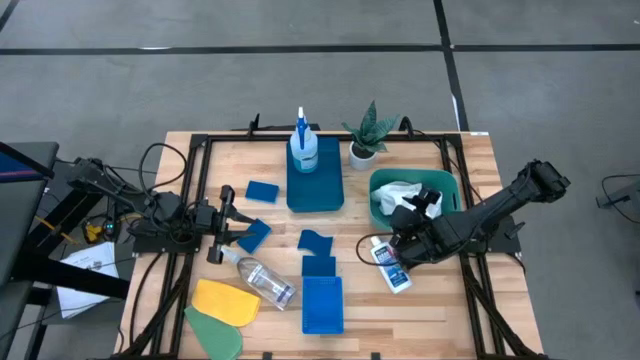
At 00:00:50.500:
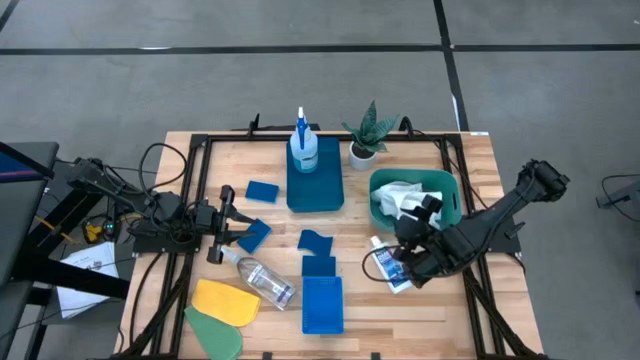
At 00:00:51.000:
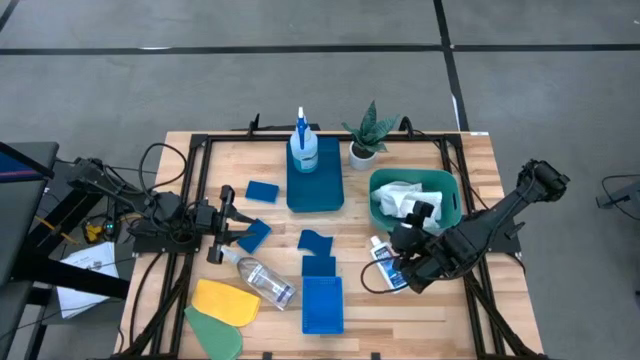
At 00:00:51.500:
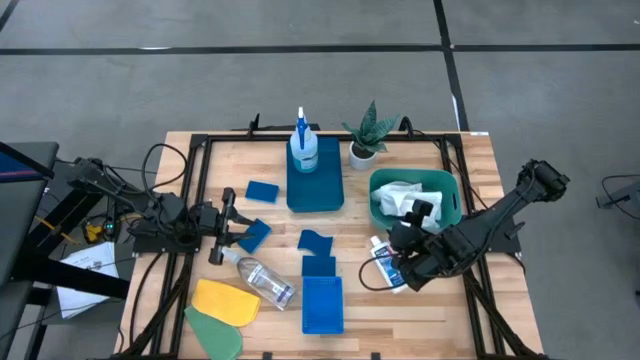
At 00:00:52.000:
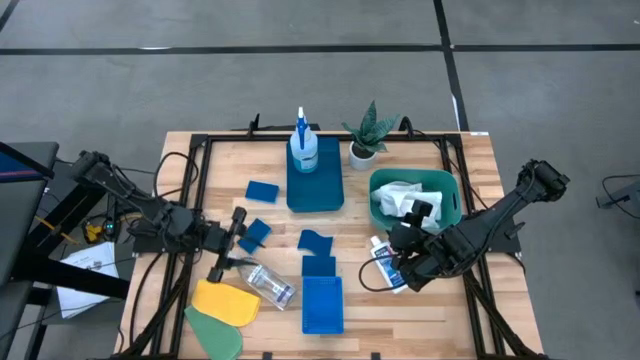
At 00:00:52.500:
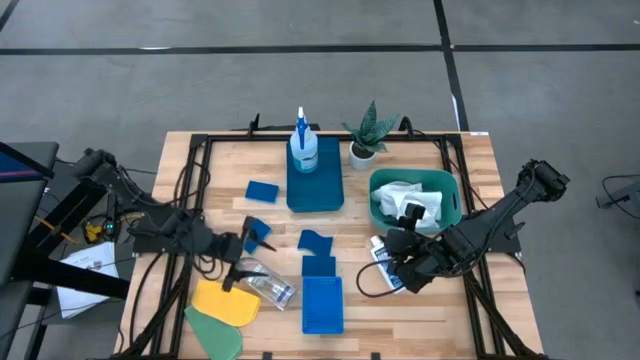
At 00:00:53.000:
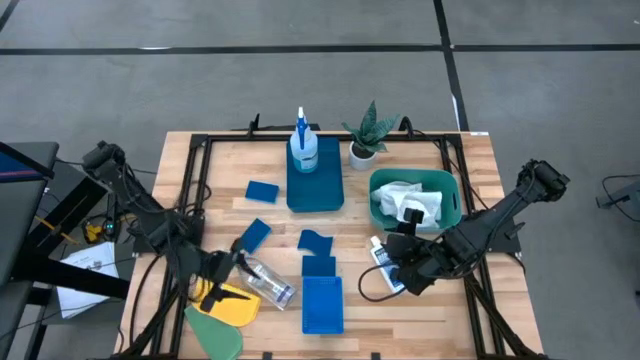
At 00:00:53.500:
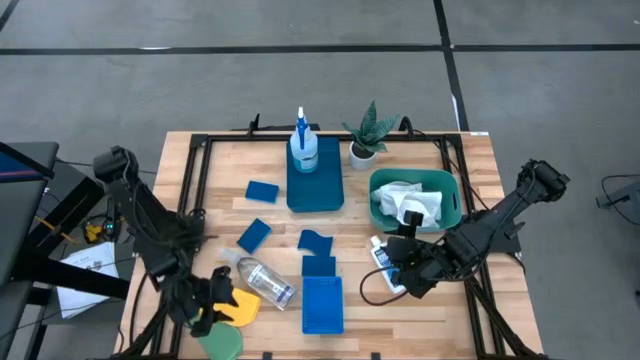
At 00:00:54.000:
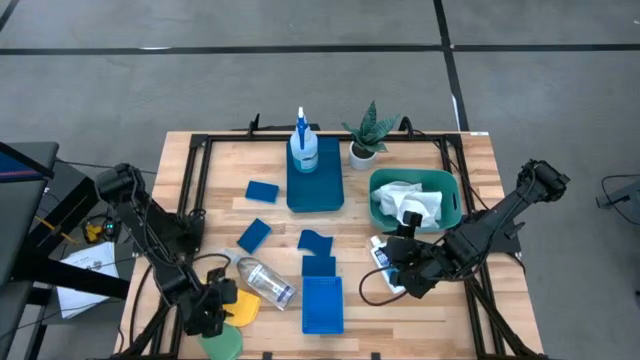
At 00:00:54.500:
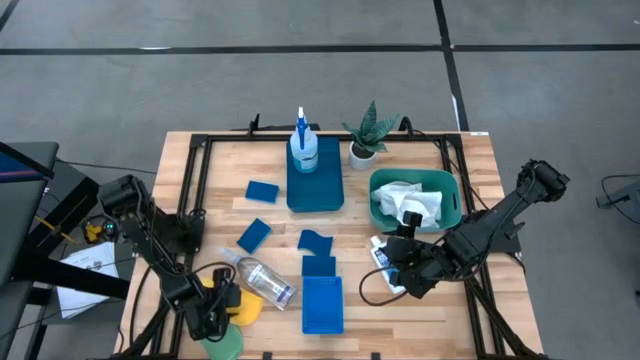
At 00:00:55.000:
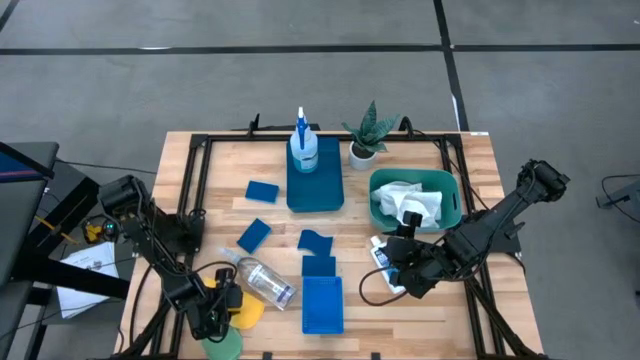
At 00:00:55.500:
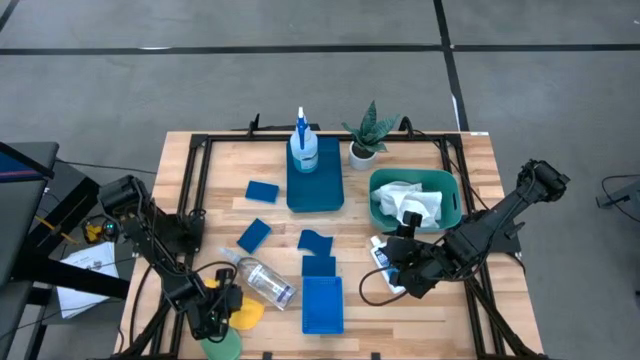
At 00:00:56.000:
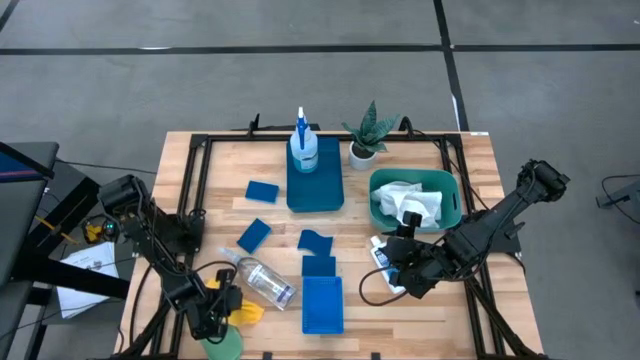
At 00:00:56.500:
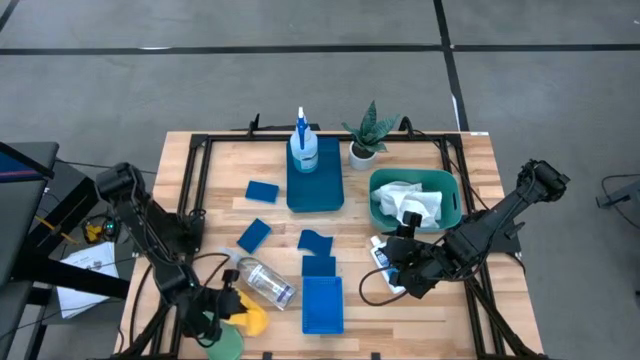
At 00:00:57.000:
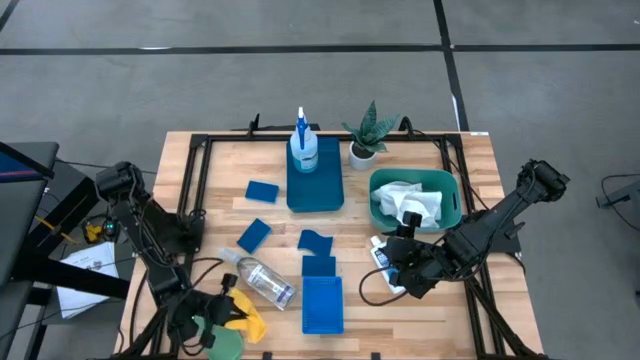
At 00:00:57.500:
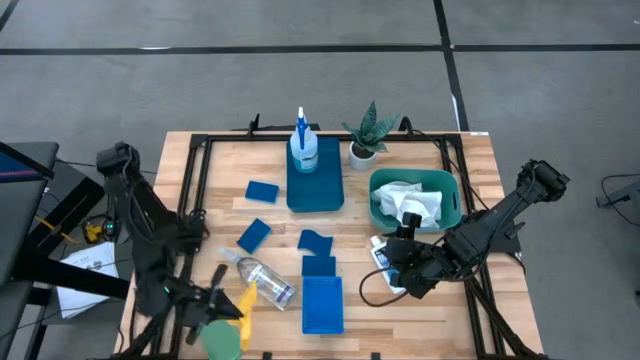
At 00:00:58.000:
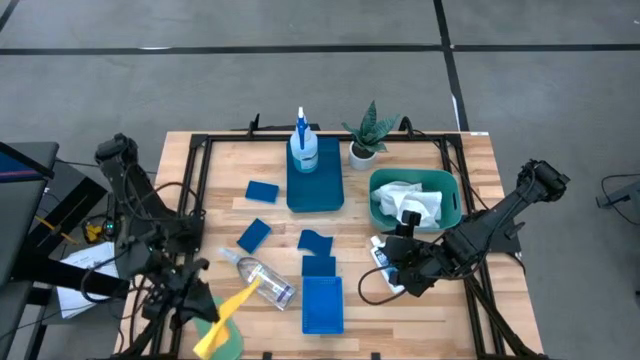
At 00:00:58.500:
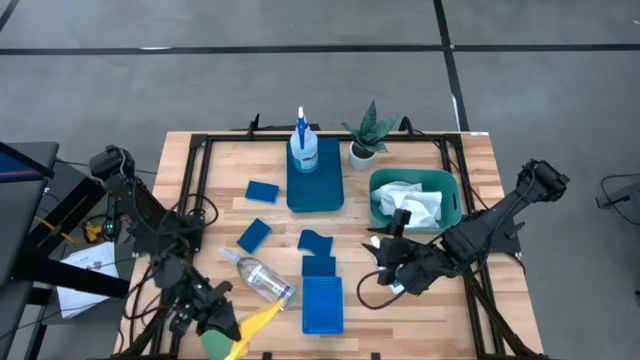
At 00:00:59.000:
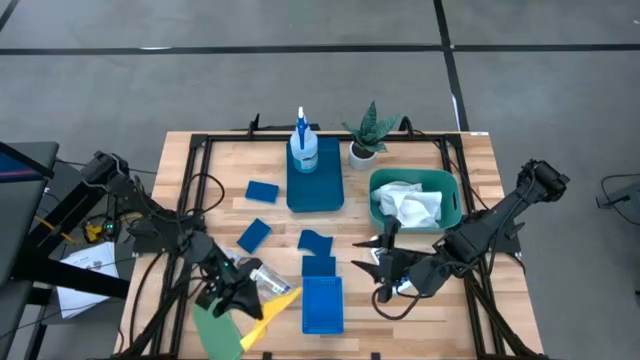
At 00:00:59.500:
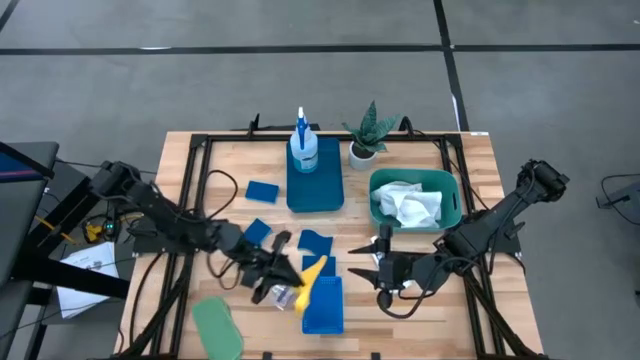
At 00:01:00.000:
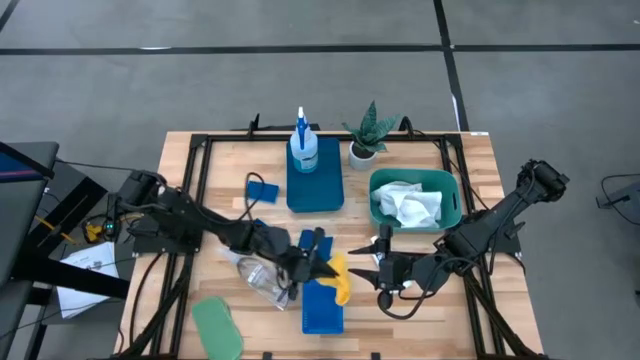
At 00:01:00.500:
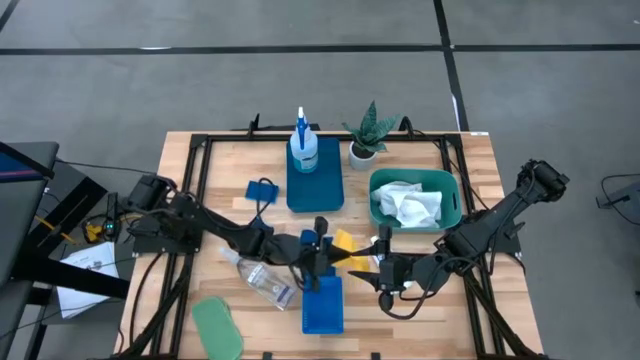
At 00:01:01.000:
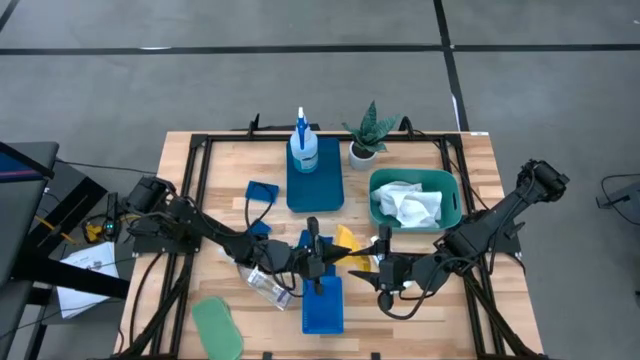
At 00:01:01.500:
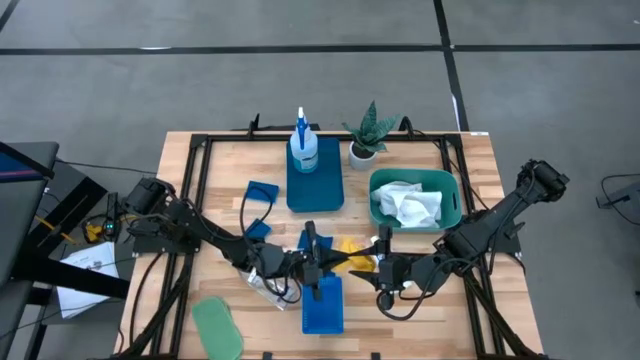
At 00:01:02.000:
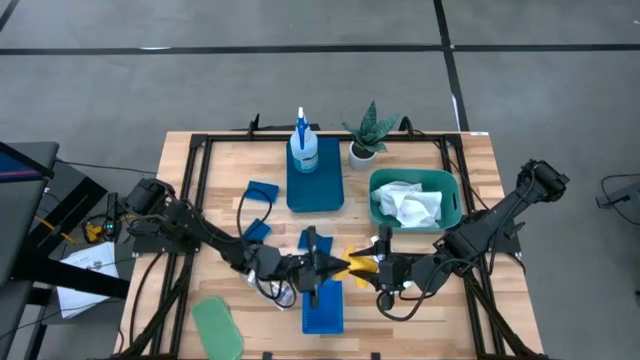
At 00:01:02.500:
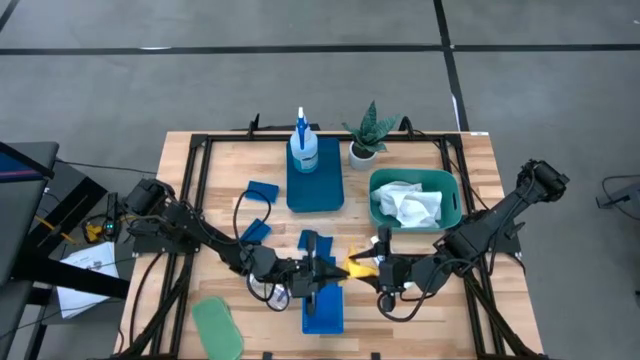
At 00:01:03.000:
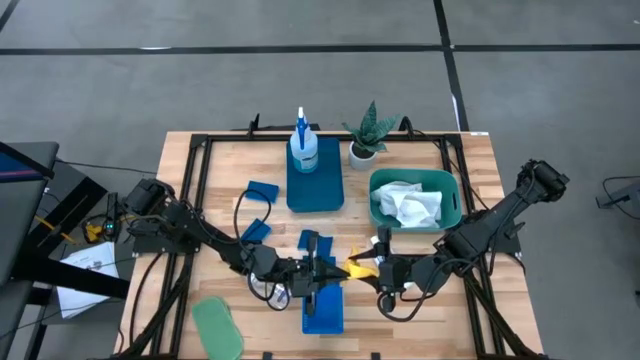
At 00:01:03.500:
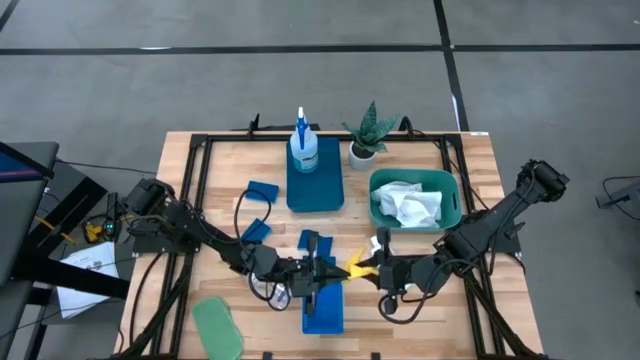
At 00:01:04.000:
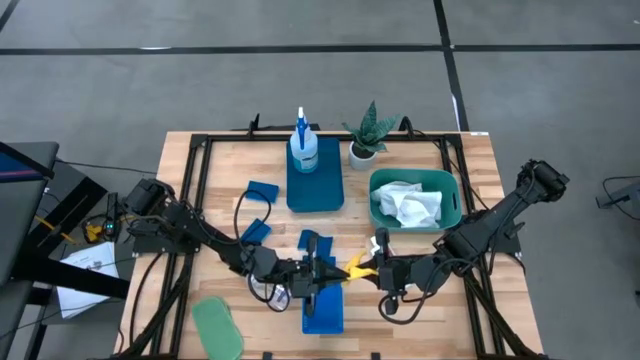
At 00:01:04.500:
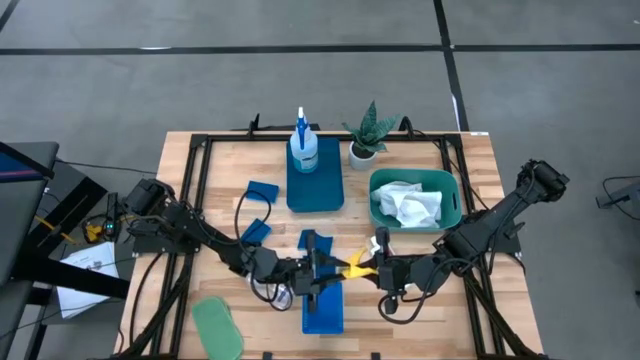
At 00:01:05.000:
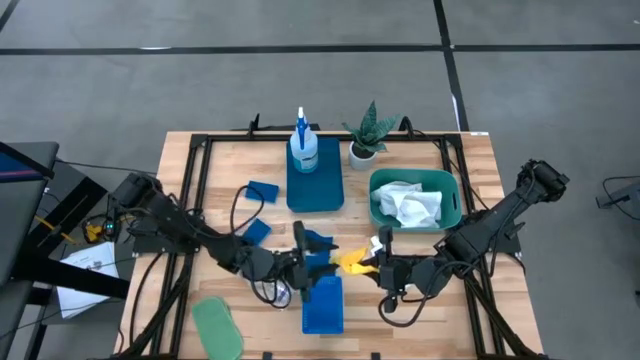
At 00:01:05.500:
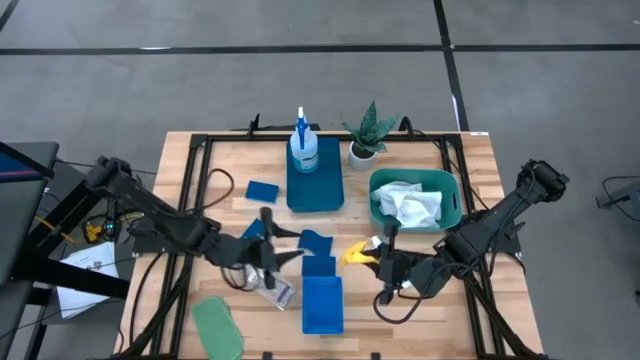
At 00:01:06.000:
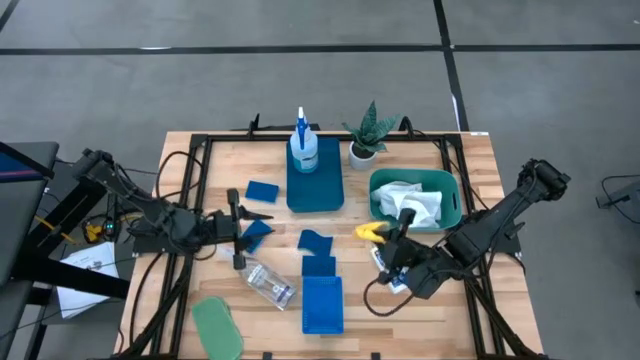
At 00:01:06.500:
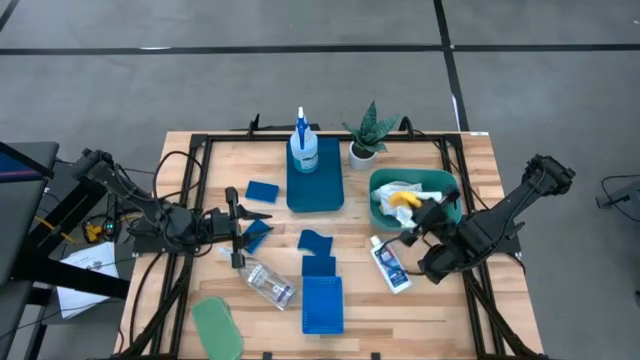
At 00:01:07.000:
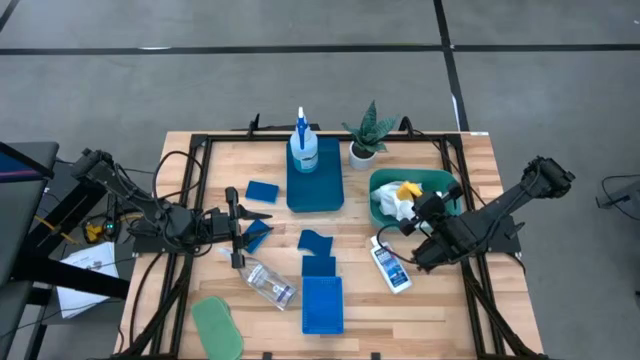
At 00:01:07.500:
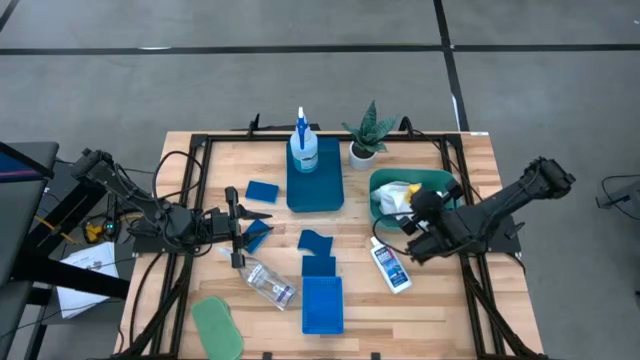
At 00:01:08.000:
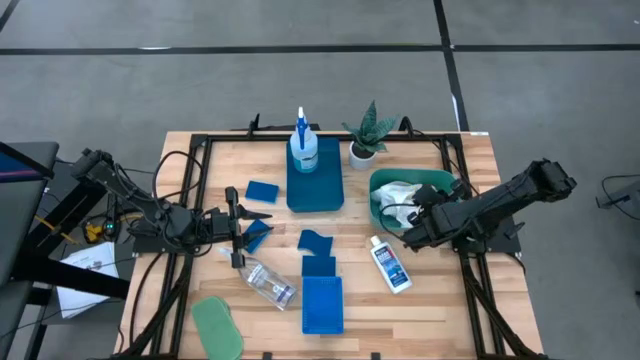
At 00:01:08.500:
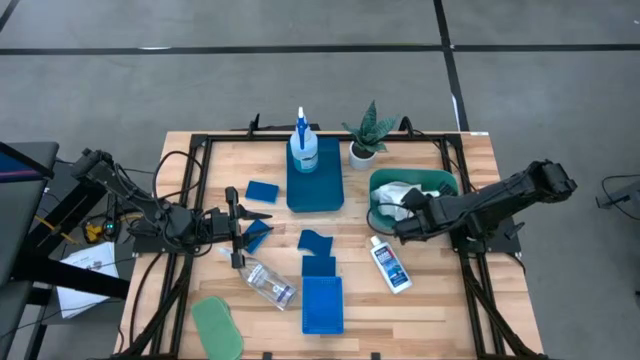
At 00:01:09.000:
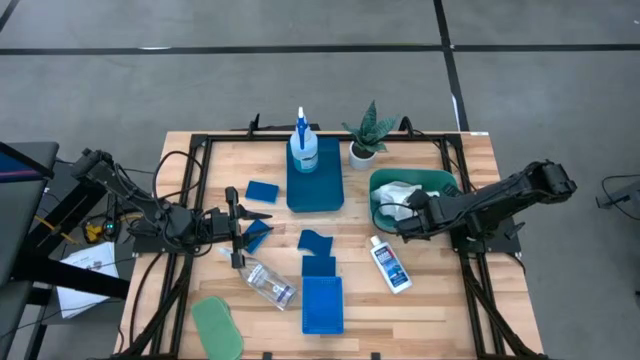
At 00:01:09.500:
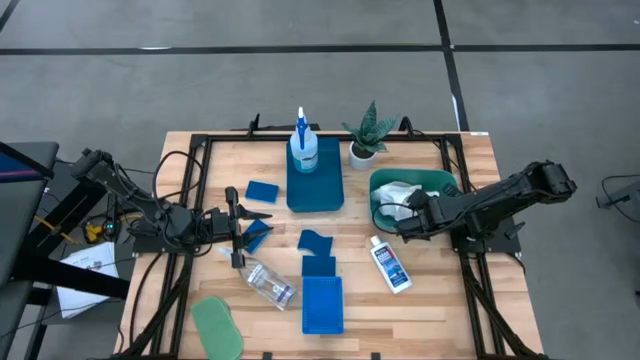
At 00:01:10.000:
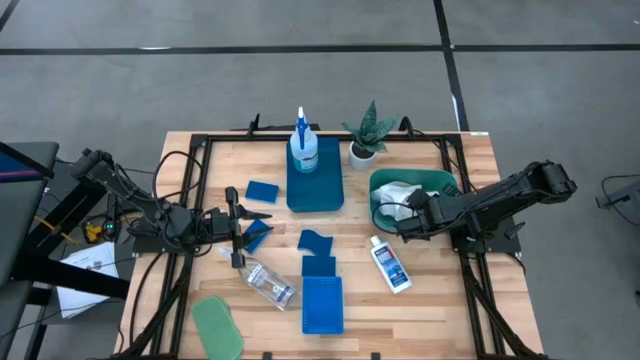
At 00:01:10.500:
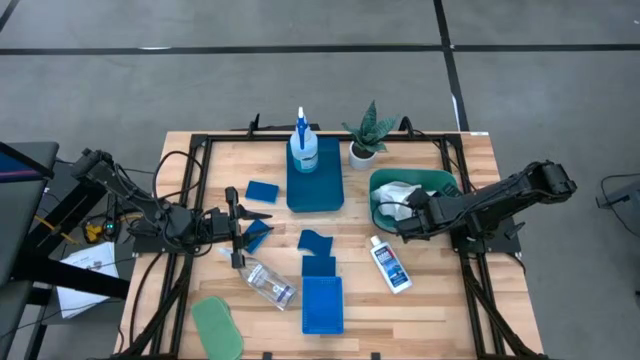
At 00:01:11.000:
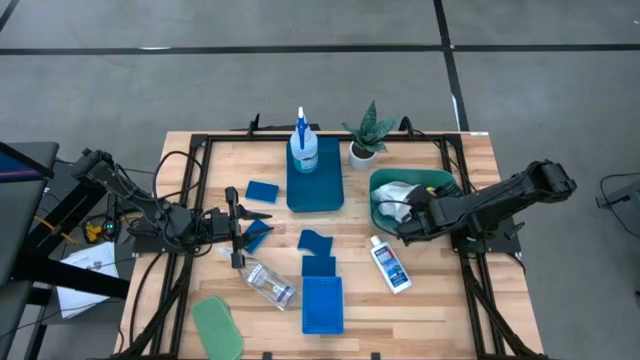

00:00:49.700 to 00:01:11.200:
Task: Pick & Place Kitchen Items
Put the yellow microfiber towel into the green bin
